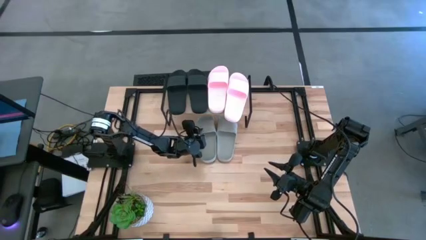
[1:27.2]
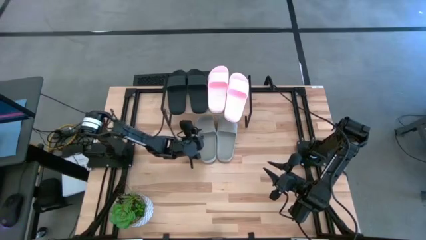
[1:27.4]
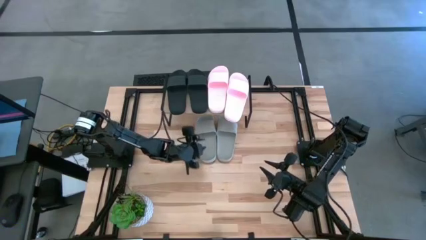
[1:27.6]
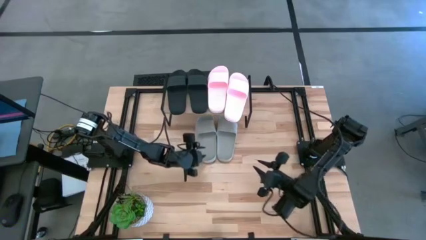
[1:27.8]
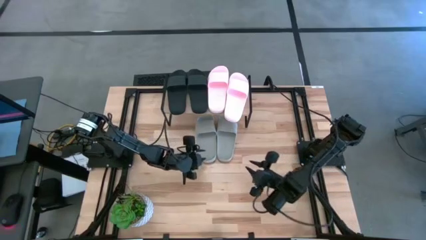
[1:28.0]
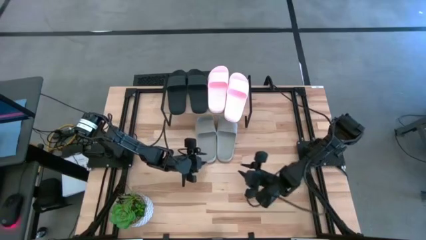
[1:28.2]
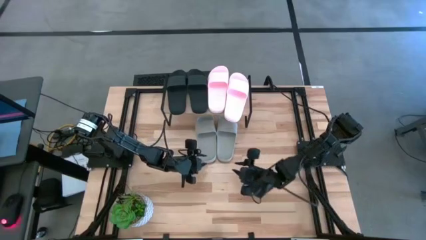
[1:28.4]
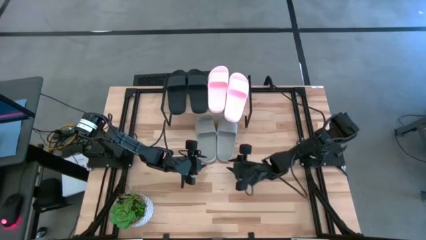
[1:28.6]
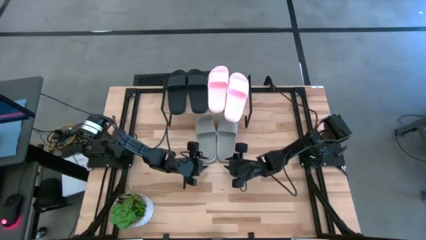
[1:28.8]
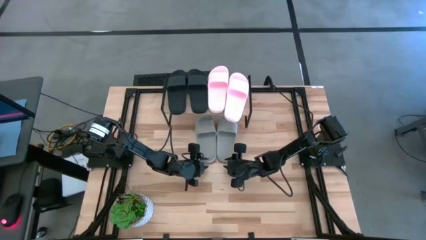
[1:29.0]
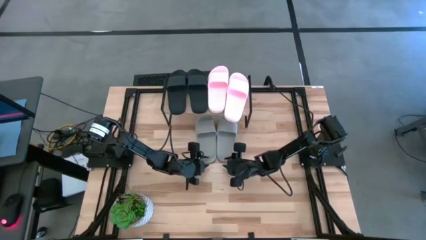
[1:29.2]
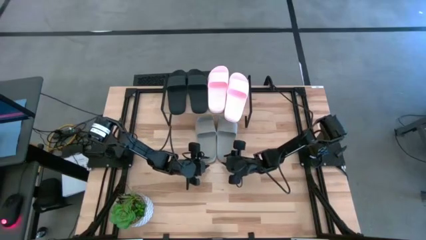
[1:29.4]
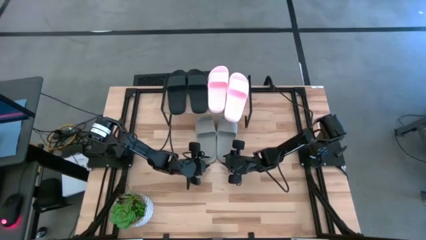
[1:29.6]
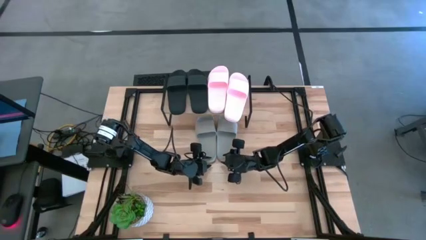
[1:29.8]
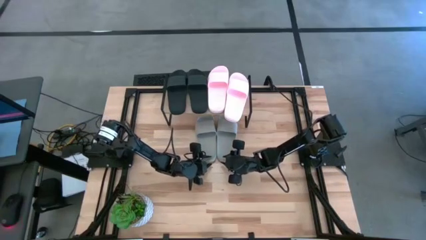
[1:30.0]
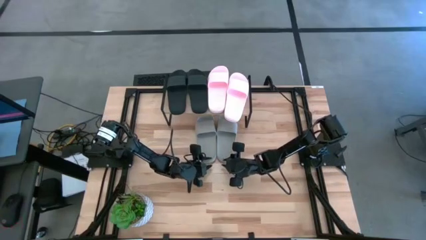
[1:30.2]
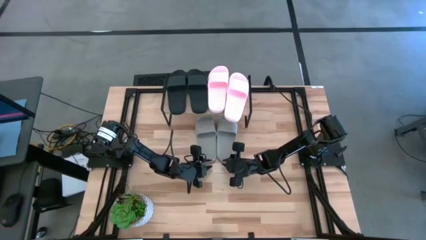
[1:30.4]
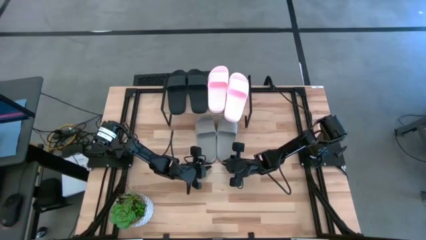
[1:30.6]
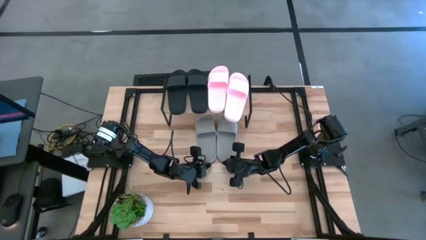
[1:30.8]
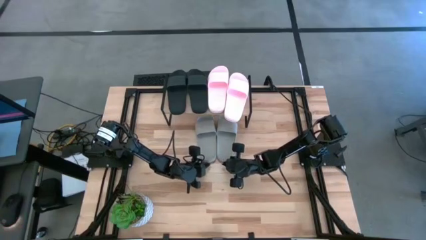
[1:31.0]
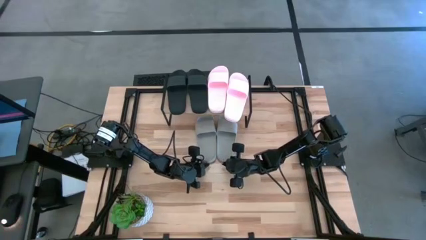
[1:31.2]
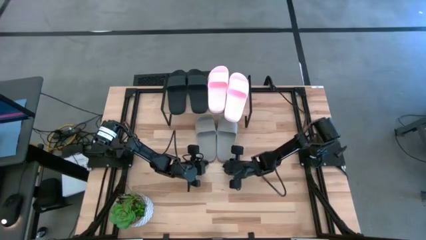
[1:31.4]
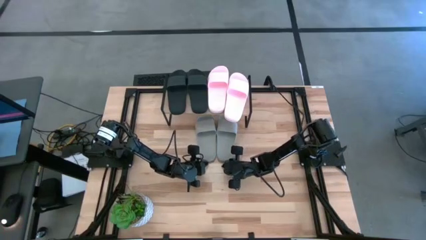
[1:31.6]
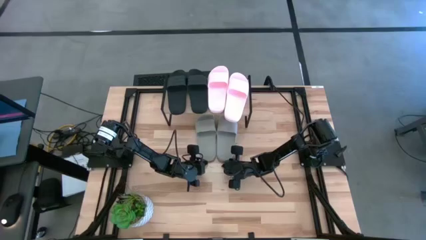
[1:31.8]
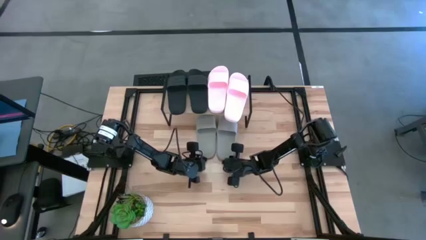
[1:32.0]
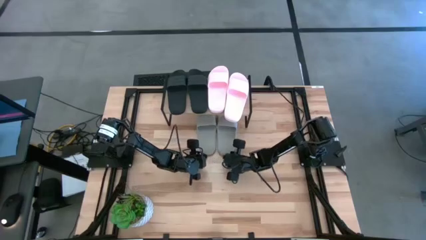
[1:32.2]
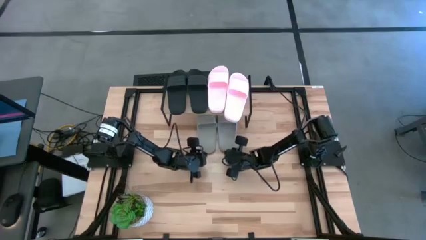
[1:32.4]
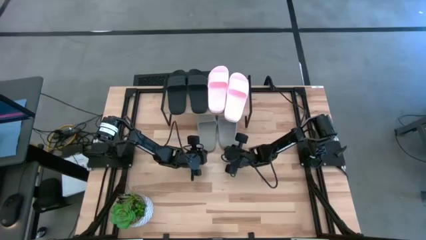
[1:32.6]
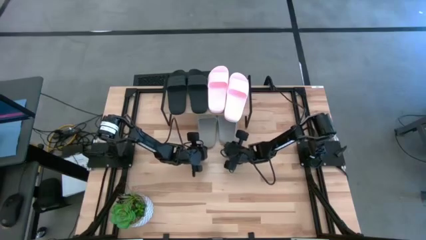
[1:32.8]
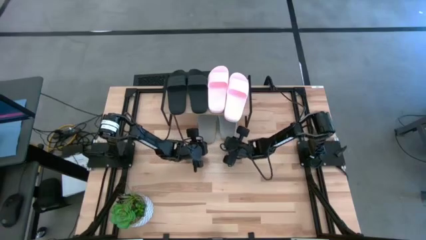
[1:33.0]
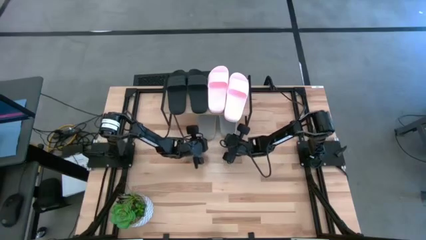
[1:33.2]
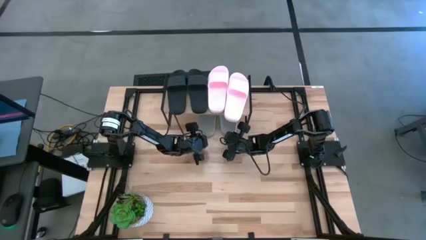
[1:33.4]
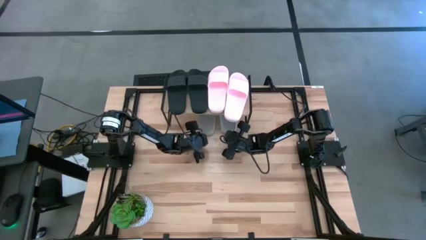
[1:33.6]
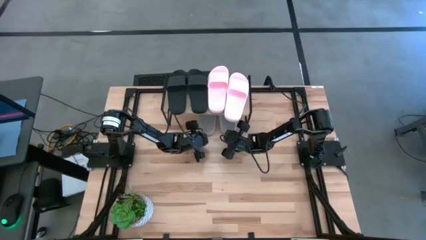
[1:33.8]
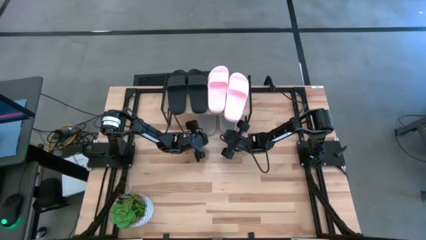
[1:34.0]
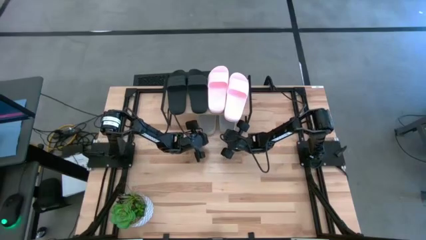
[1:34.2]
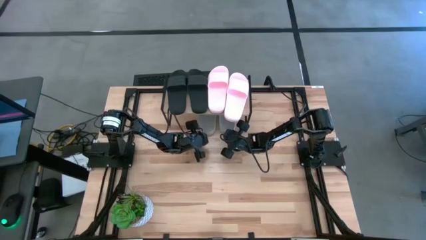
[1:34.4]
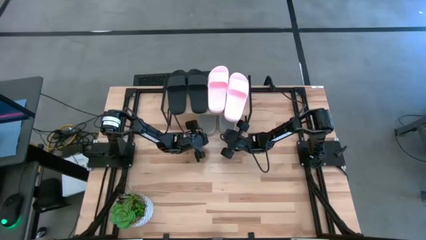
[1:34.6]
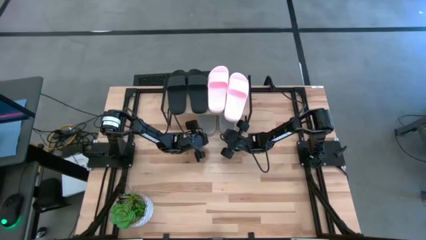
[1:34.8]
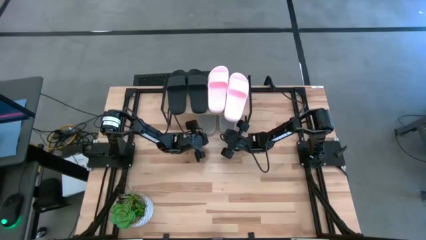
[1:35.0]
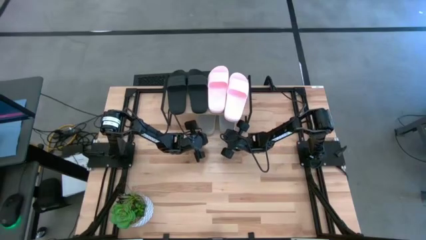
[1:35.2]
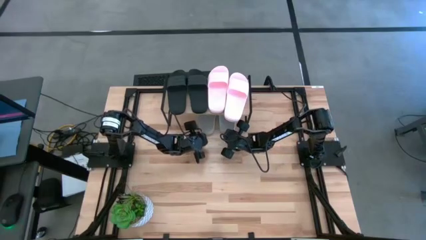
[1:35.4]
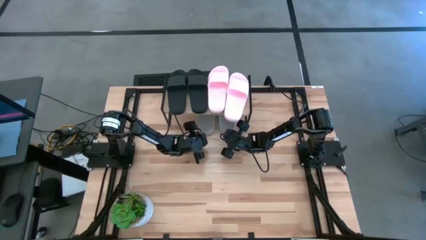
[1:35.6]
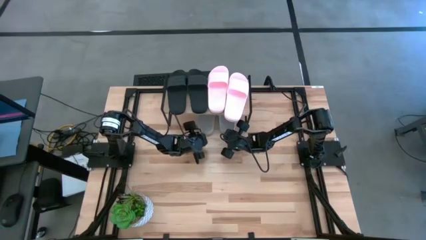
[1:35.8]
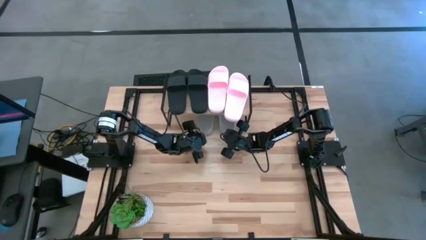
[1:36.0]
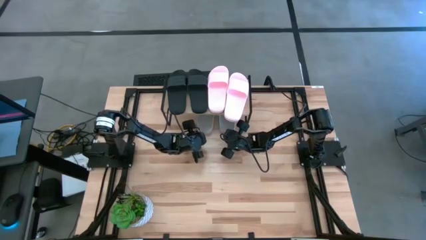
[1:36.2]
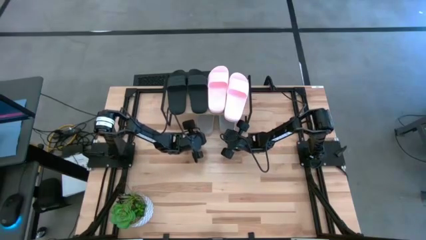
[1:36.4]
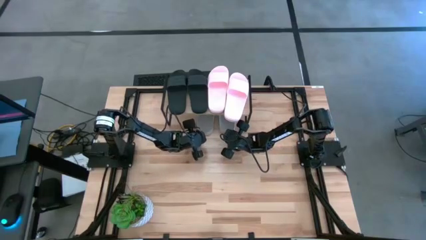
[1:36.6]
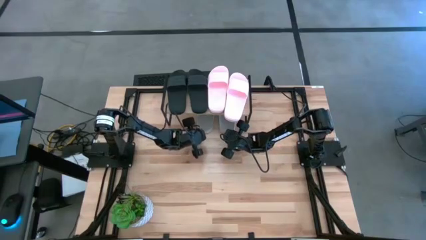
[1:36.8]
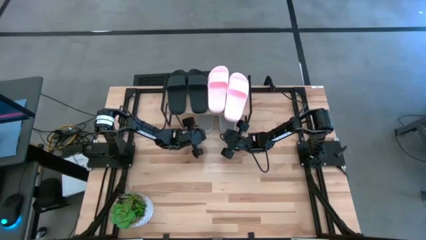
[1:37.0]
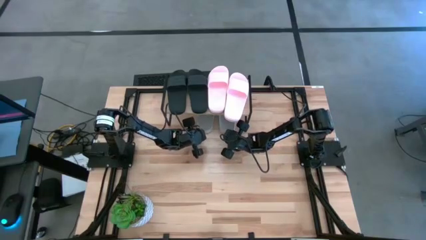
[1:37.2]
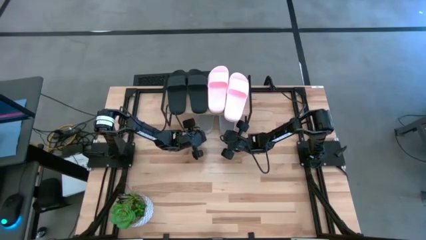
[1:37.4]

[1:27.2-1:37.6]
Task: Pick and place slides into the shelf
Adjust the gray slides under the shelf

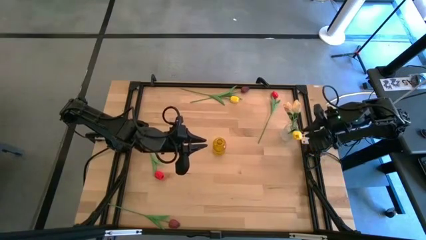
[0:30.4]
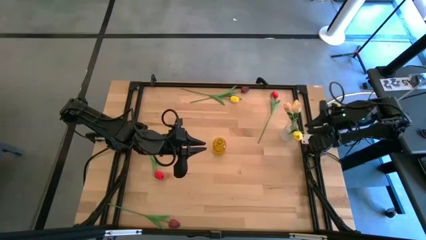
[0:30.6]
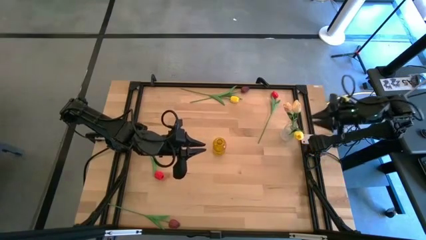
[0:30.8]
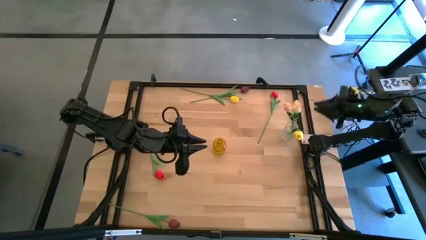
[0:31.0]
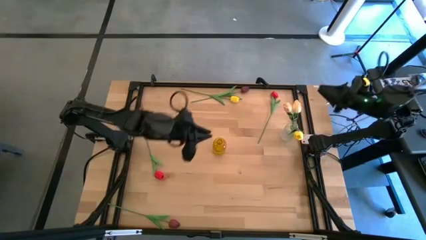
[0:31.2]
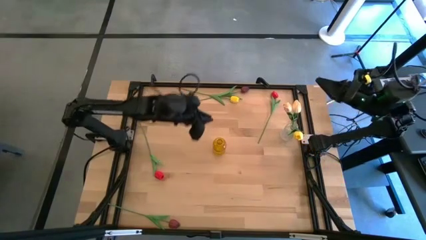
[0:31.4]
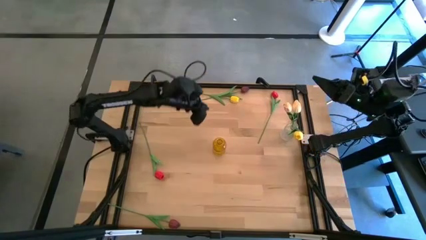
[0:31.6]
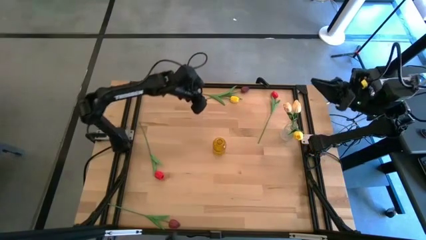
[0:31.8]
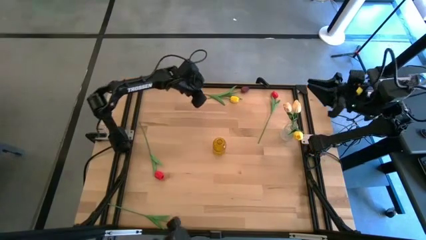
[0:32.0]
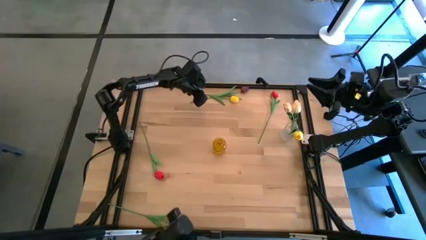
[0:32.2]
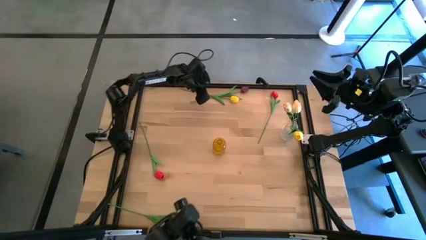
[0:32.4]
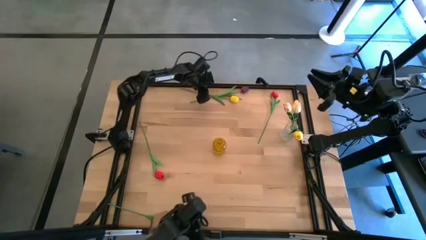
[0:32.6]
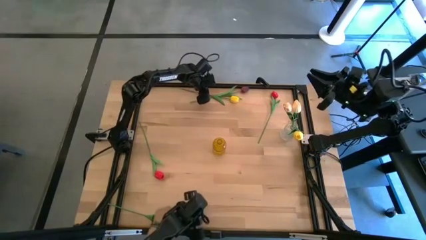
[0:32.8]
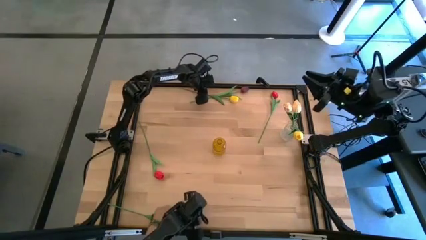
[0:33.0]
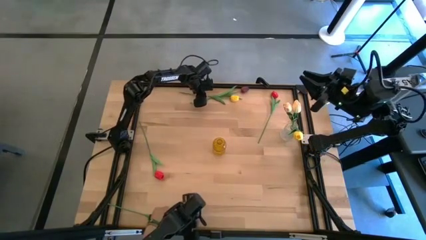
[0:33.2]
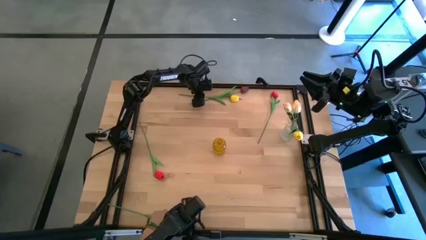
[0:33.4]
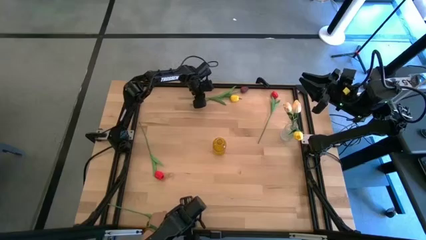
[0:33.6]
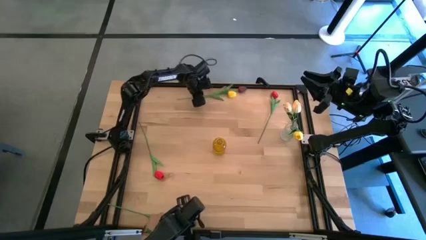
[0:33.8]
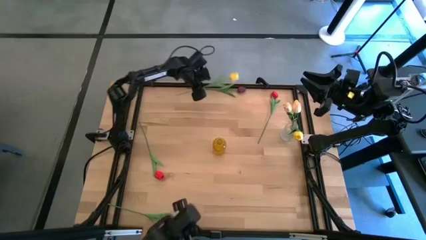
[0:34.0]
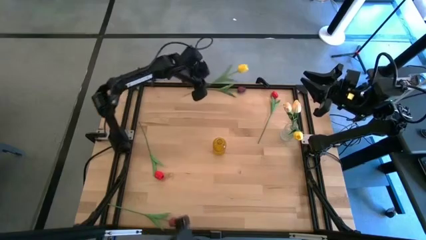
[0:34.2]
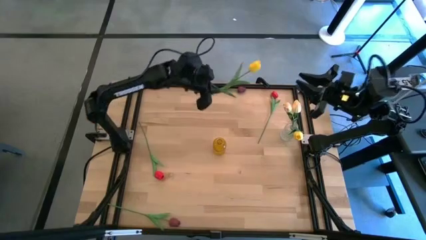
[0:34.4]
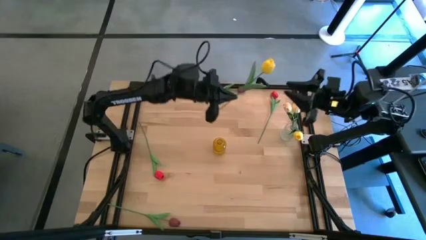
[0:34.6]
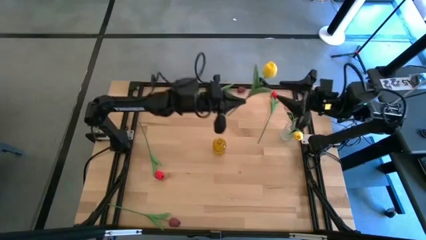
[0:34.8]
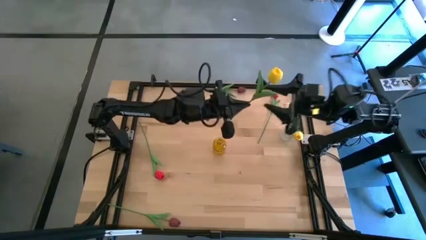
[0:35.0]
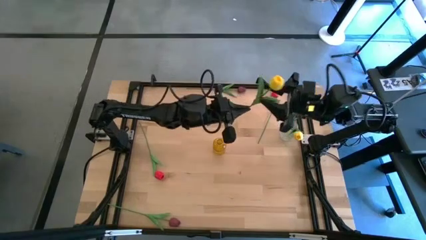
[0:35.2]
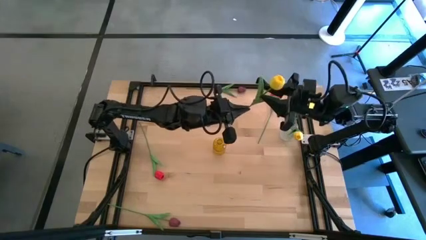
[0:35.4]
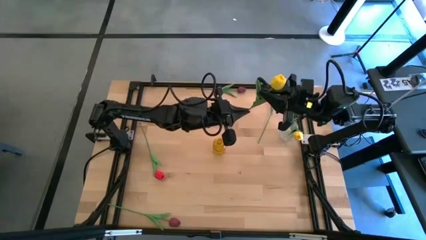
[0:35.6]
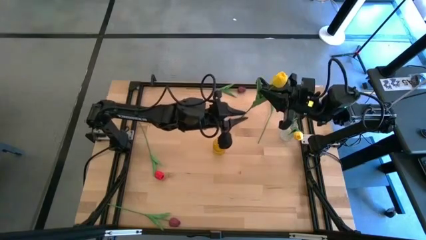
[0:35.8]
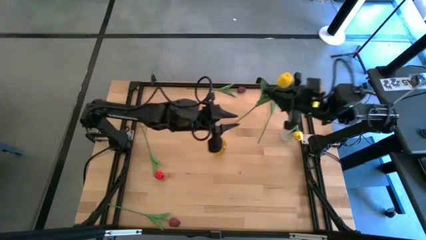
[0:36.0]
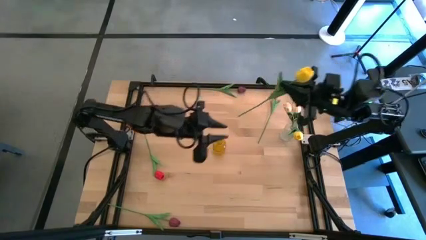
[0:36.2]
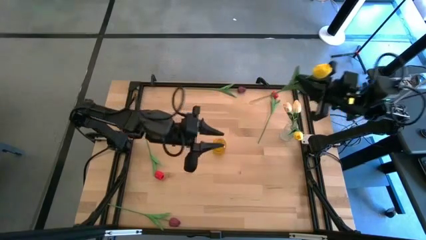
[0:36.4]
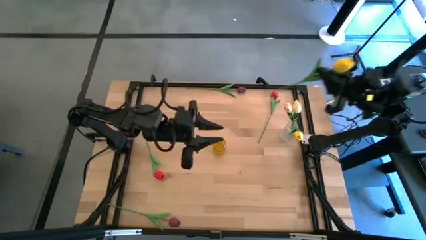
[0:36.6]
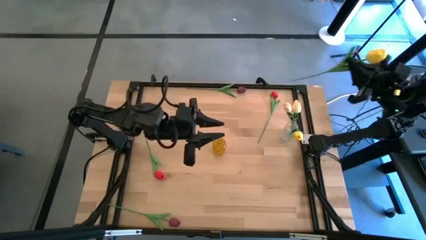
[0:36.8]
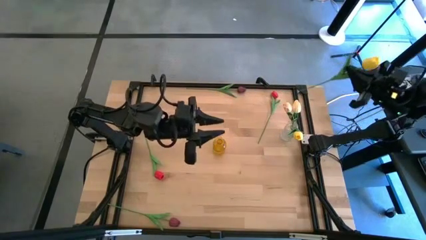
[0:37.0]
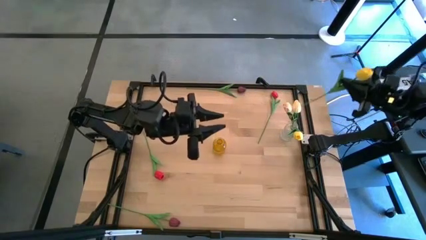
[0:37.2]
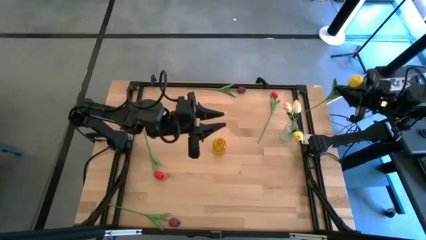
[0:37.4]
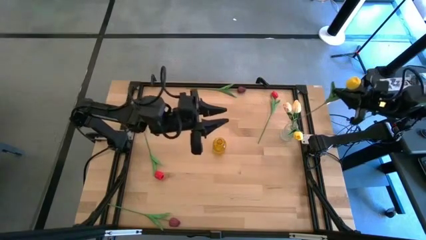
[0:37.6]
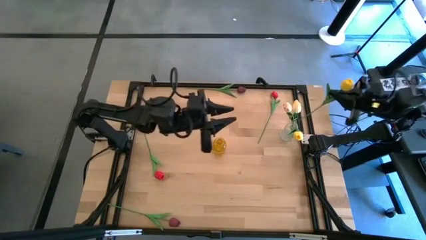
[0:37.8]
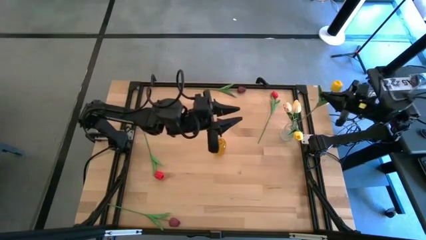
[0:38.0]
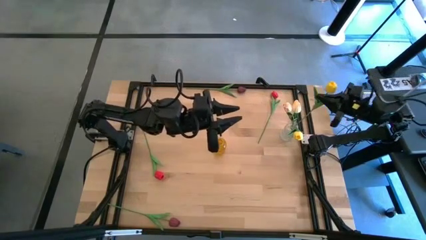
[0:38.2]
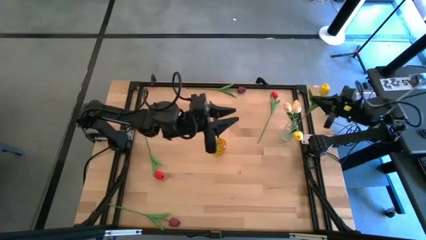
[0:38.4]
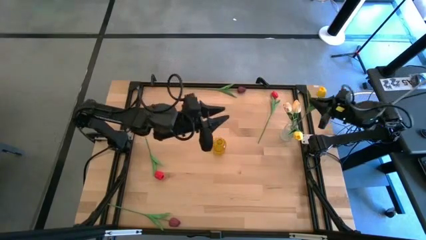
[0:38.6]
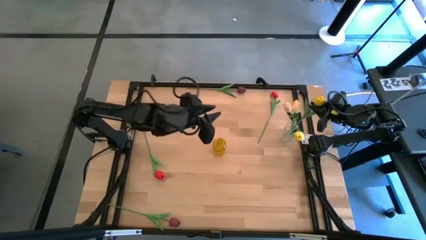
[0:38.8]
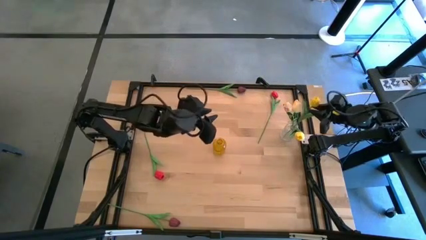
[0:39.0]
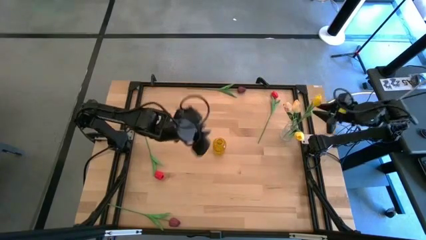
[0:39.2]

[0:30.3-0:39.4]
Task: Sort flowers into vase by color
Put the yellow tulip into the transparent vase
